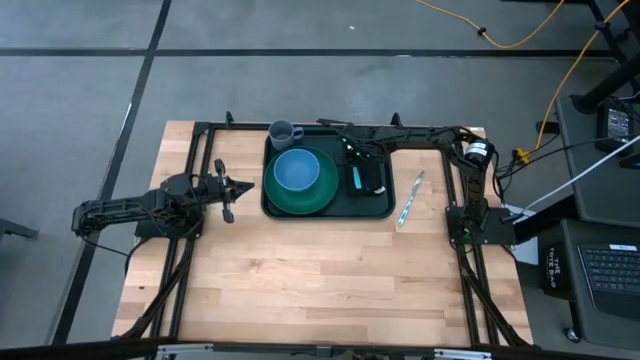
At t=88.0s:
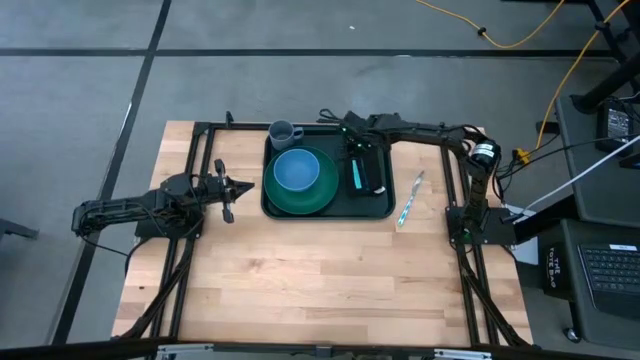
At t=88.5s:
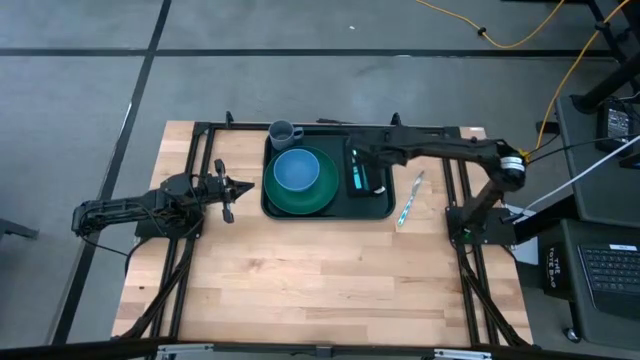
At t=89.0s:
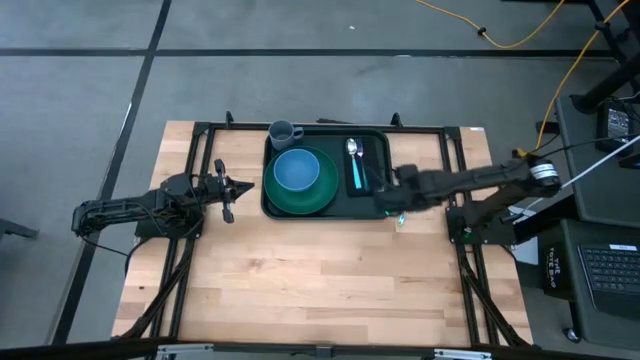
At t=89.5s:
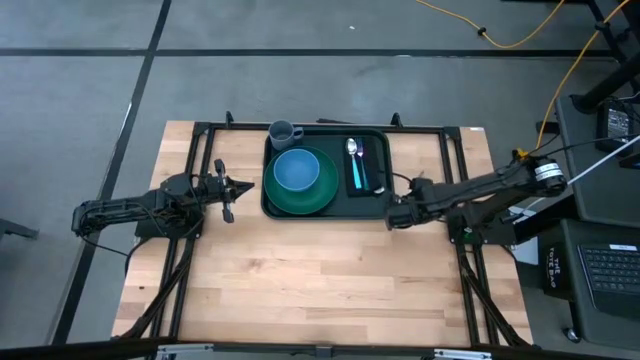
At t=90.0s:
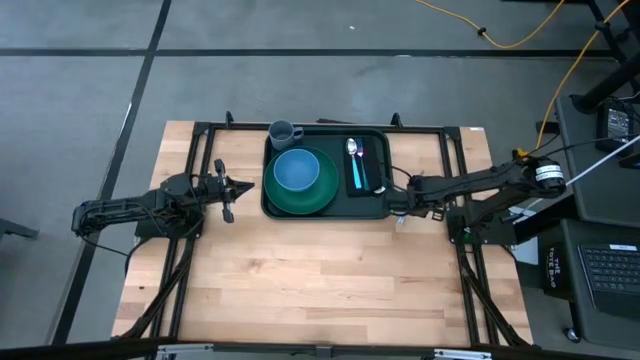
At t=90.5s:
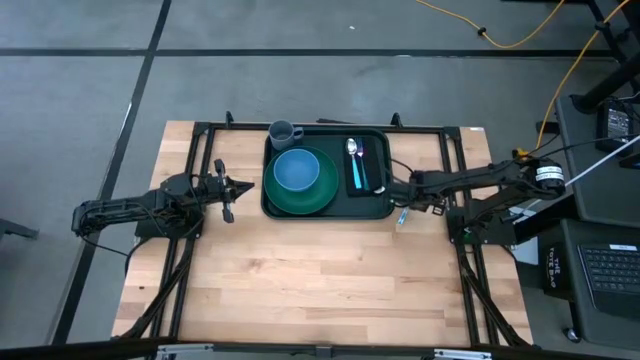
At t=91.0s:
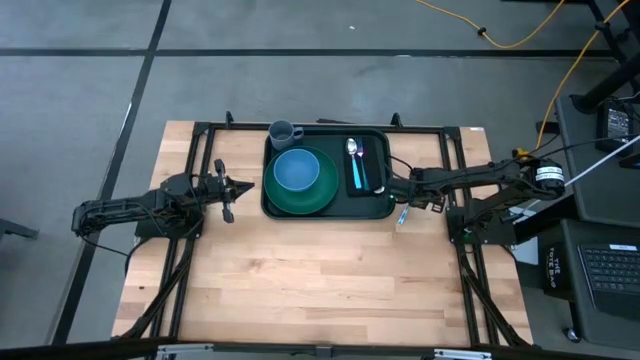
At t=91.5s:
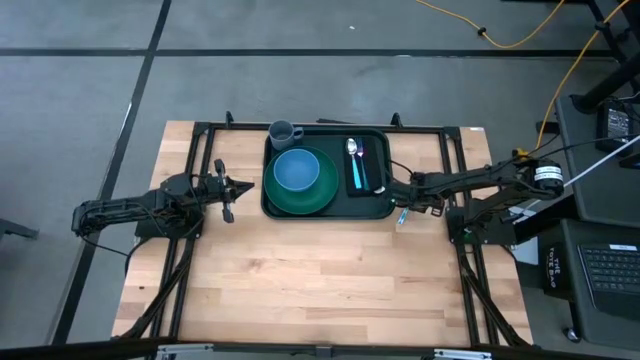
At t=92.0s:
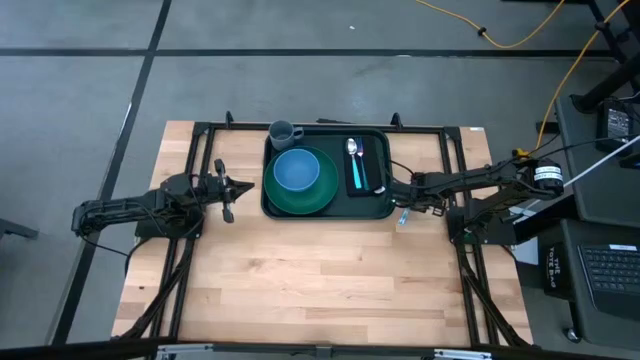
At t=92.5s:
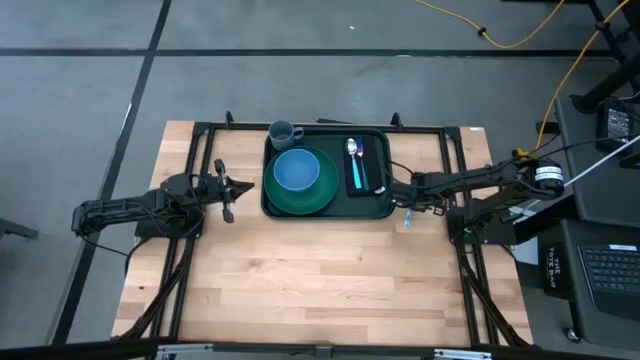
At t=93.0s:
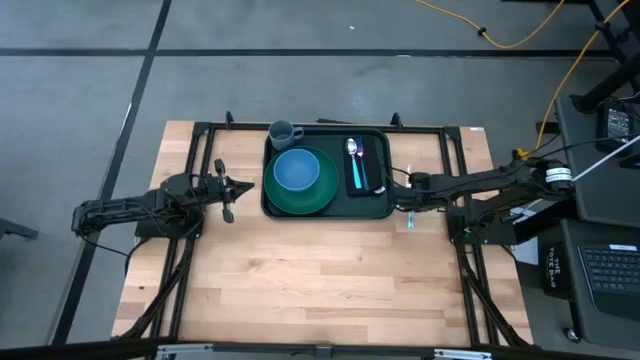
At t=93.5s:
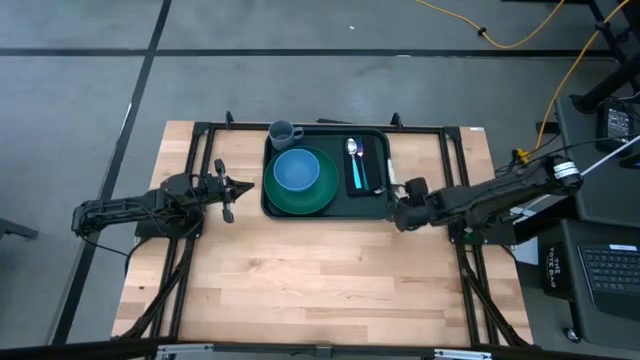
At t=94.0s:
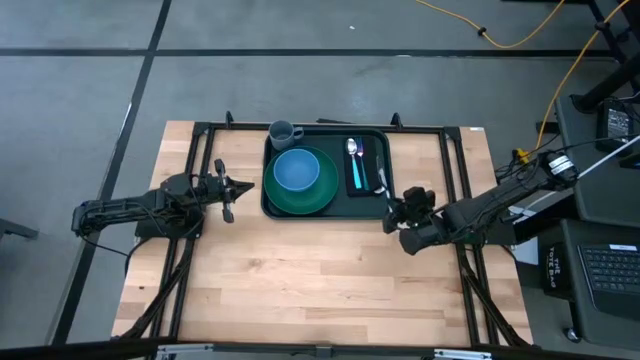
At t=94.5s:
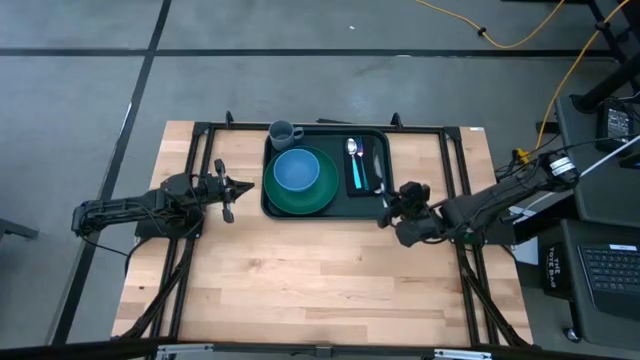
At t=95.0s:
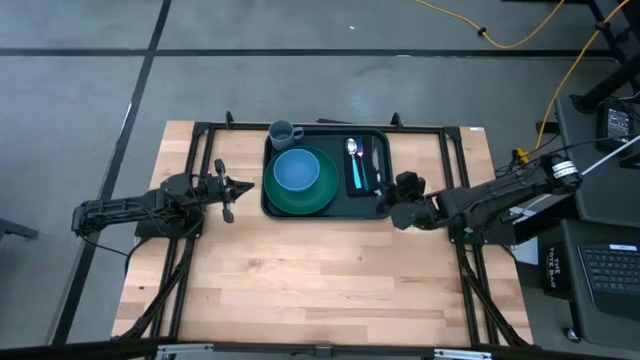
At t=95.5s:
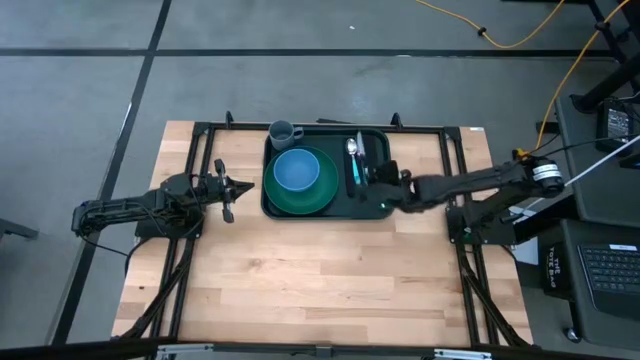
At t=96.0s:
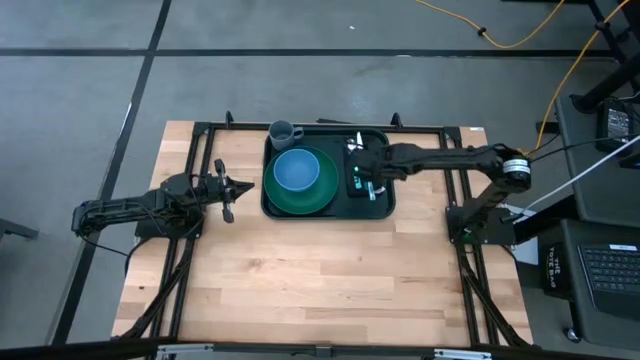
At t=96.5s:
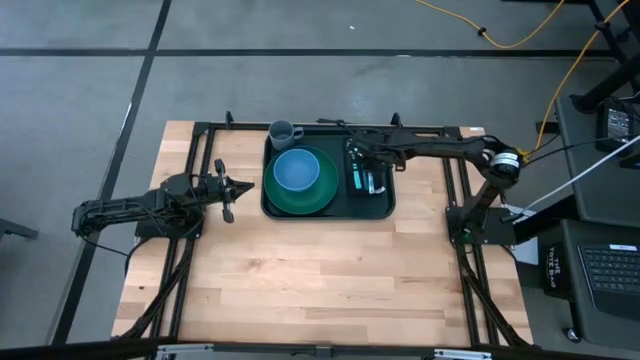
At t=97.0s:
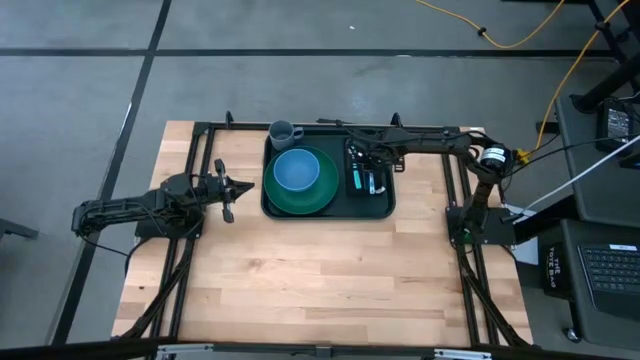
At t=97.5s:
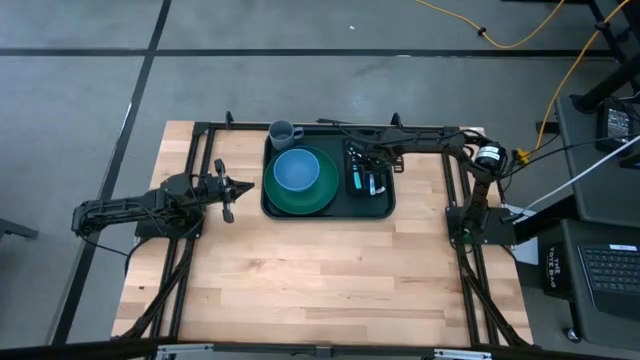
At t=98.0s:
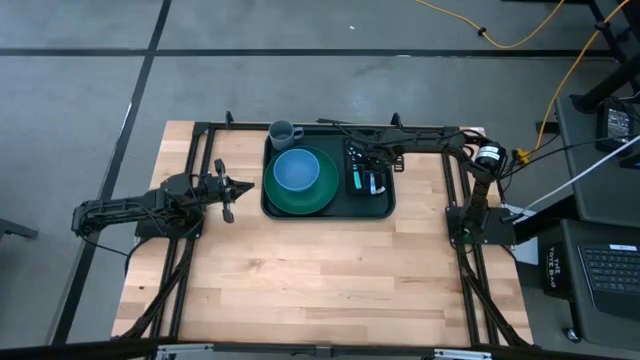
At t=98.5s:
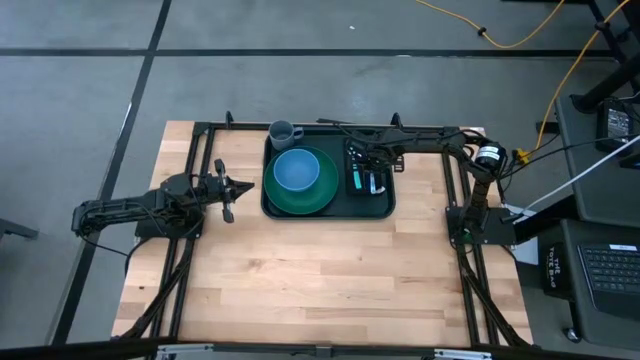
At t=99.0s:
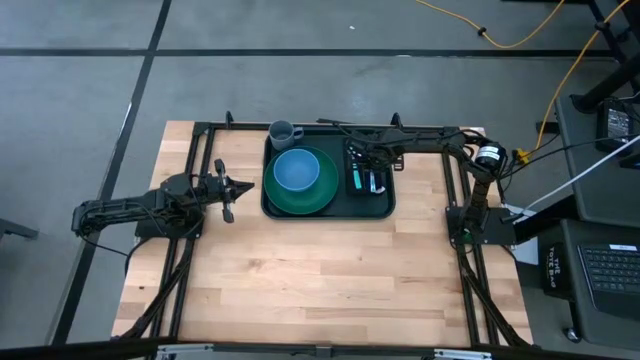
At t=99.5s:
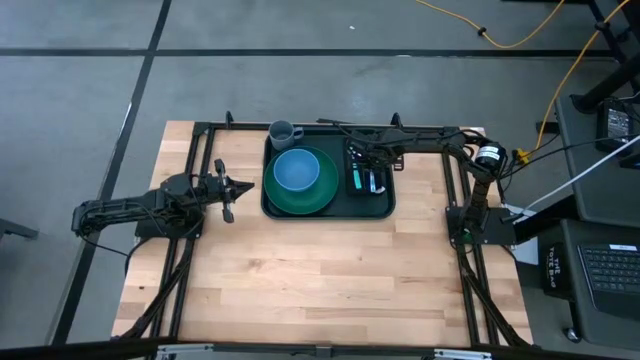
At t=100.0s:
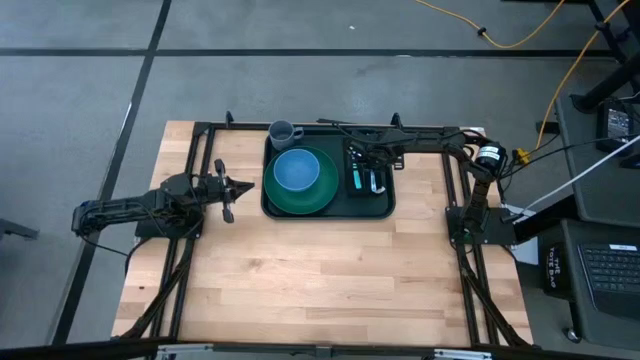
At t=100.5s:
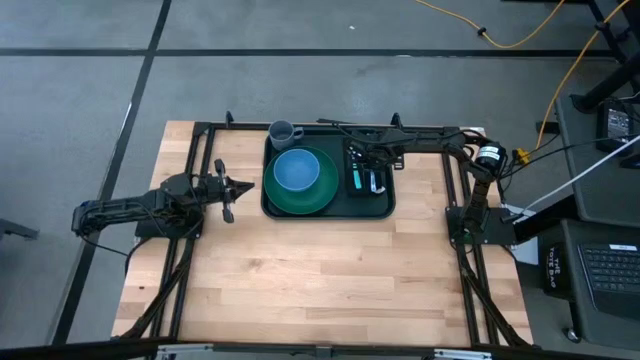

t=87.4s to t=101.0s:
Task: Set up tray
Put the blue knife on the black napkin to the right of the blue fork on the green serving tray

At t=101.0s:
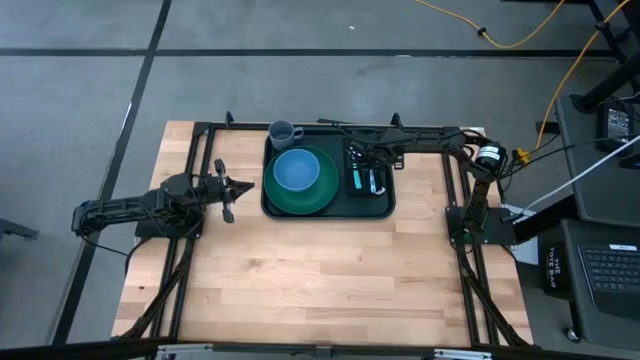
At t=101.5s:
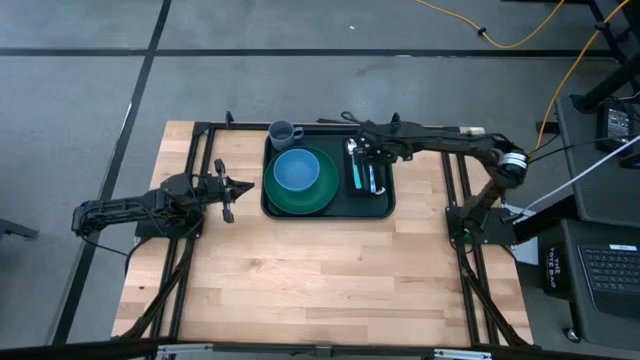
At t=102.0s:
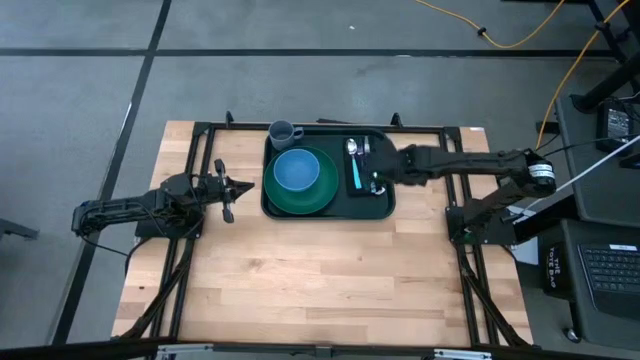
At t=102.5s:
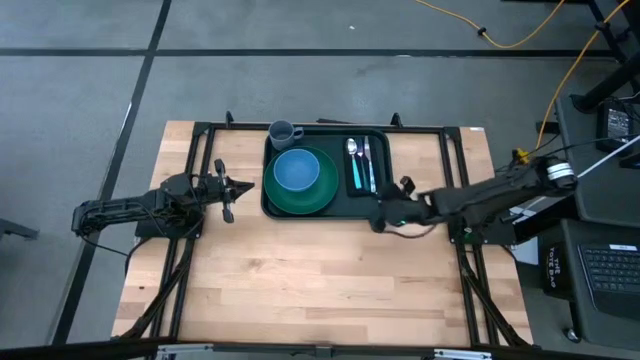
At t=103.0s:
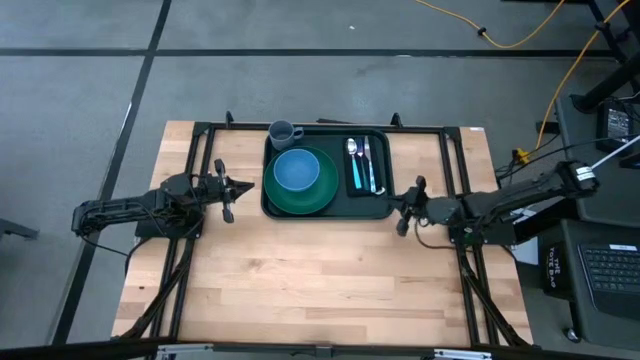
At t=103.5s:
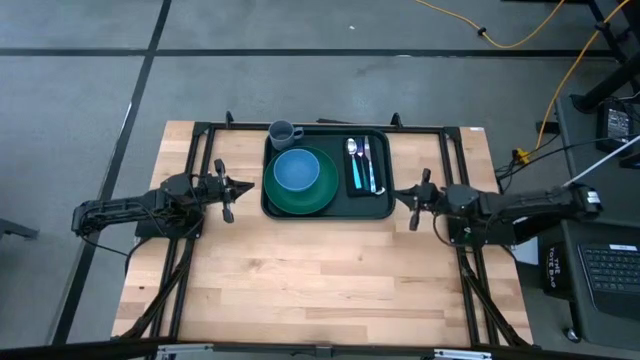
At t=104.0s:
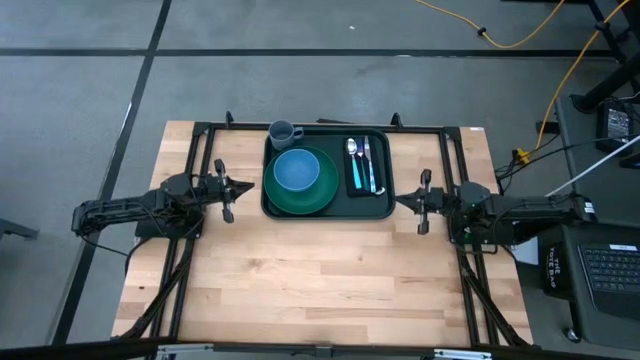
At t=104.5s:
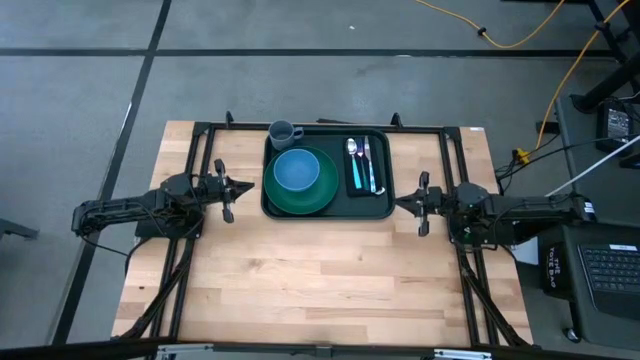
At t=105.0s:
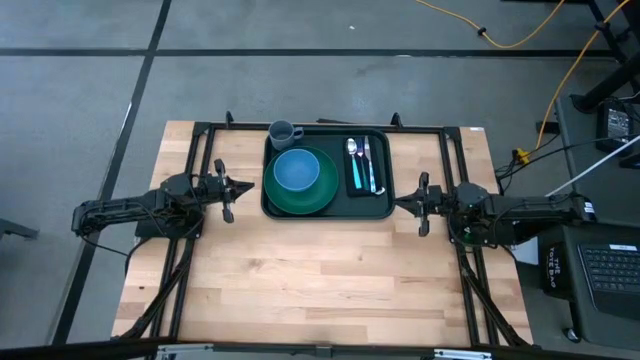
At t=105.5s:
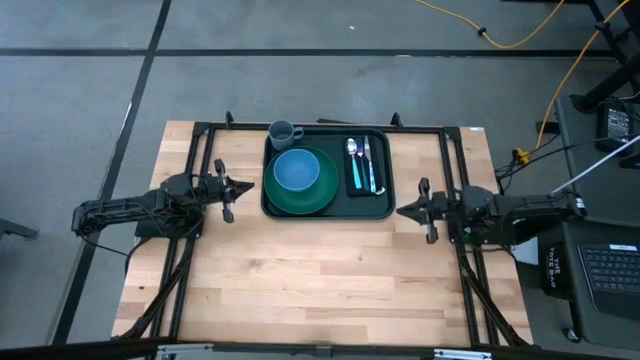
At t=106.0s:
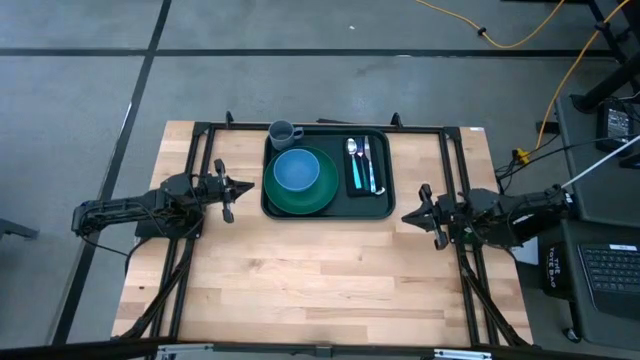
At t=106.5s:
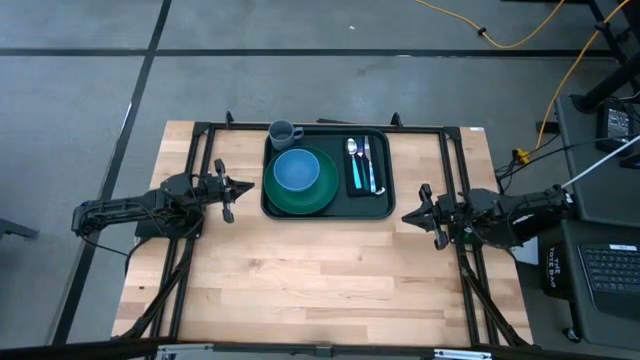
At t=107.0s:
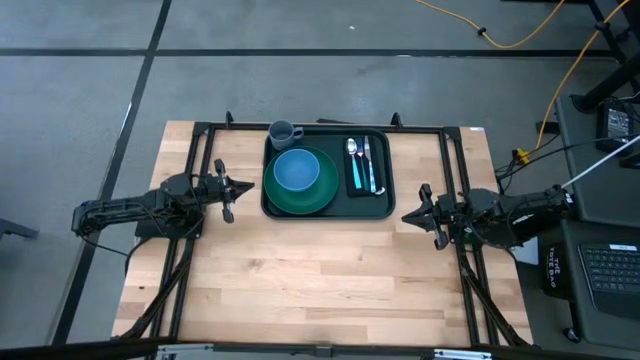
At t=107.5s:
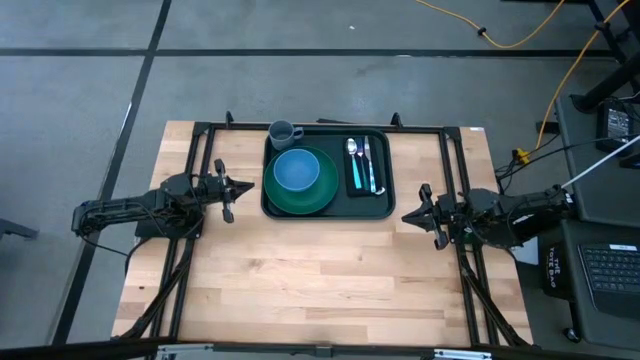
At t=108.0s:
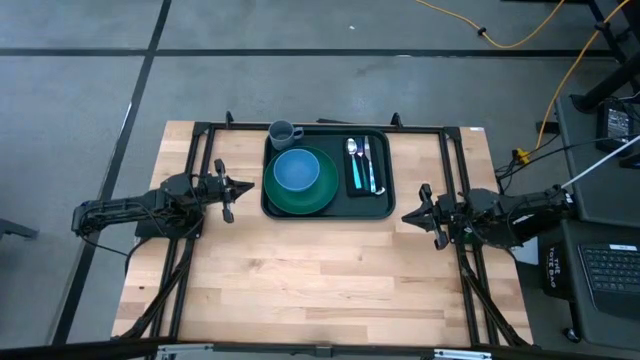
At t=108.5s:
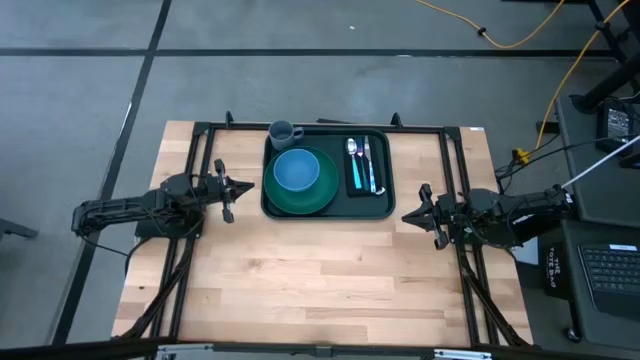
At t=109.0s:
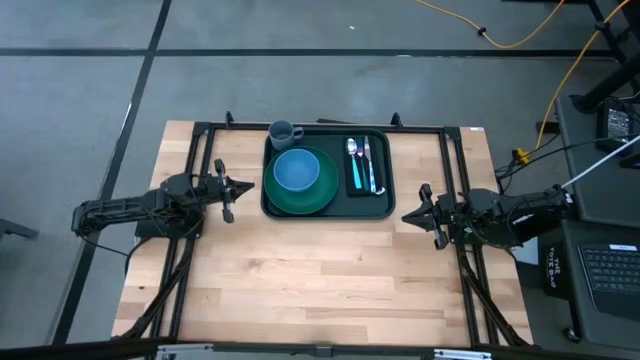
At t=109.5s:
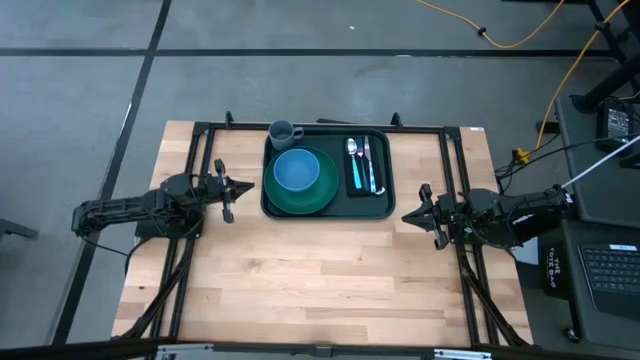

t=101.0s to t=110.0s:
Return to Home Position
